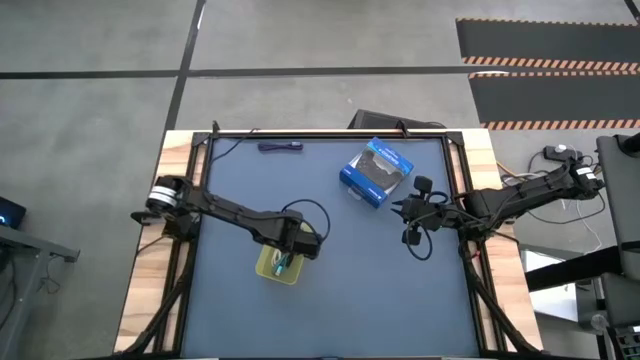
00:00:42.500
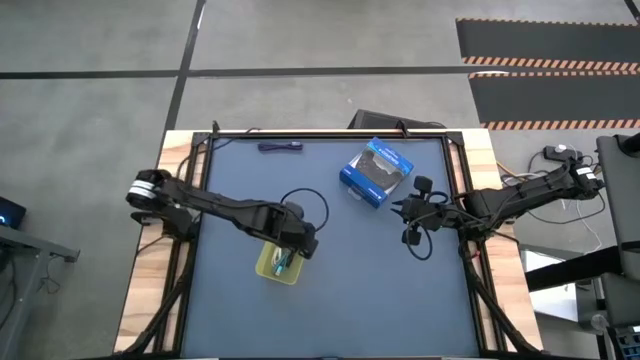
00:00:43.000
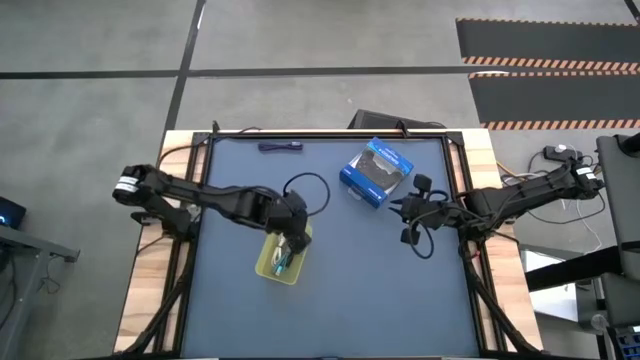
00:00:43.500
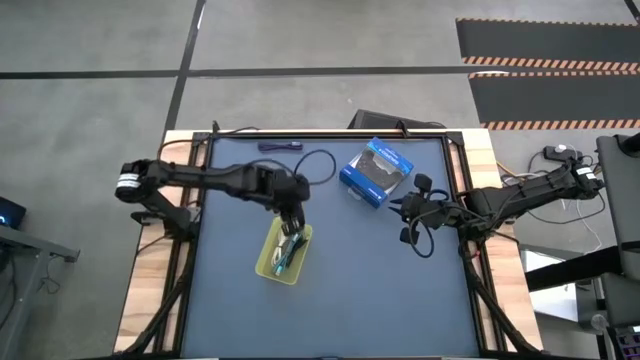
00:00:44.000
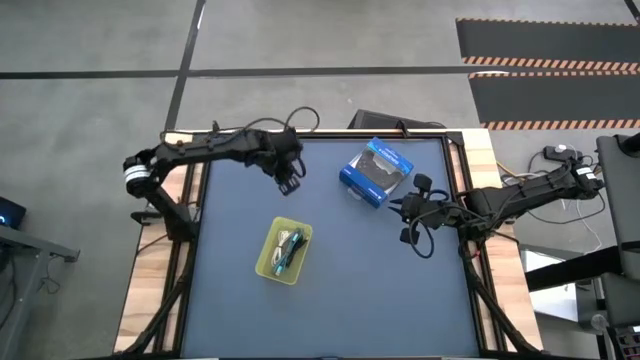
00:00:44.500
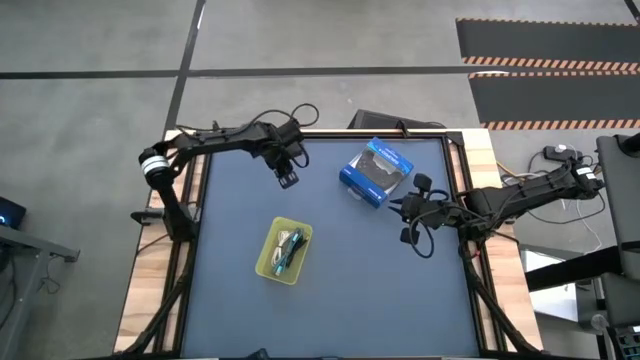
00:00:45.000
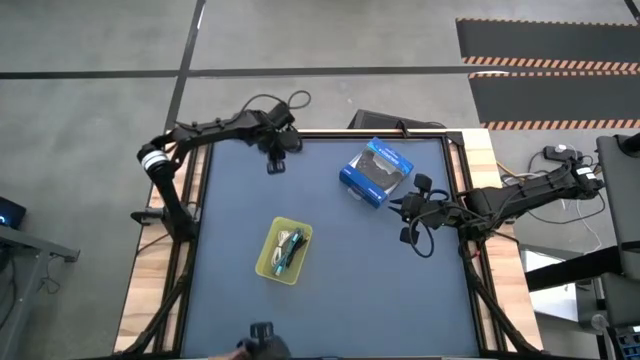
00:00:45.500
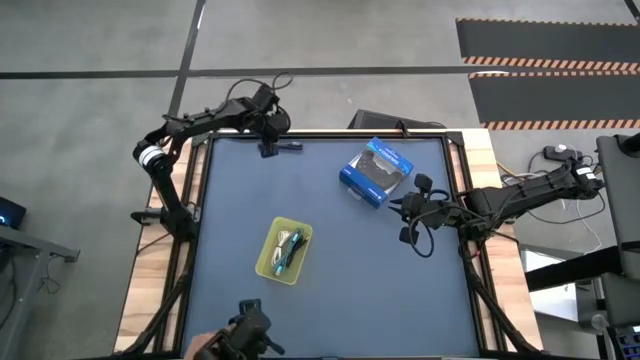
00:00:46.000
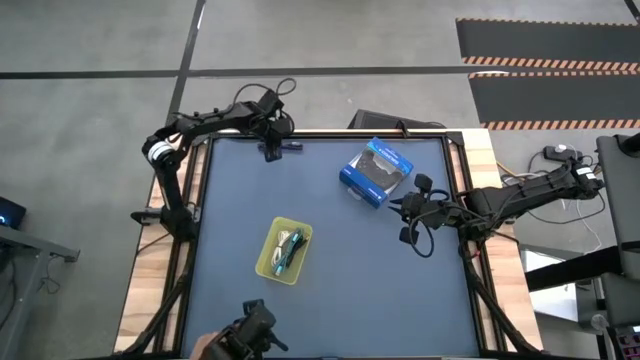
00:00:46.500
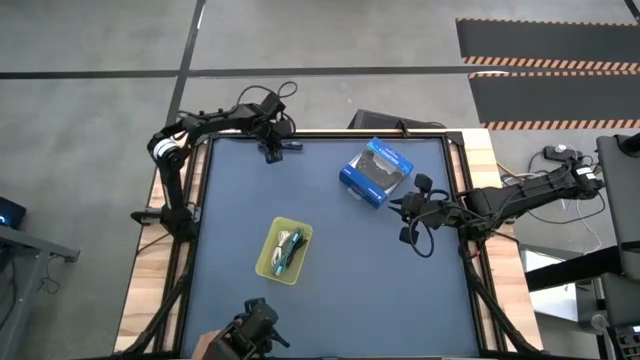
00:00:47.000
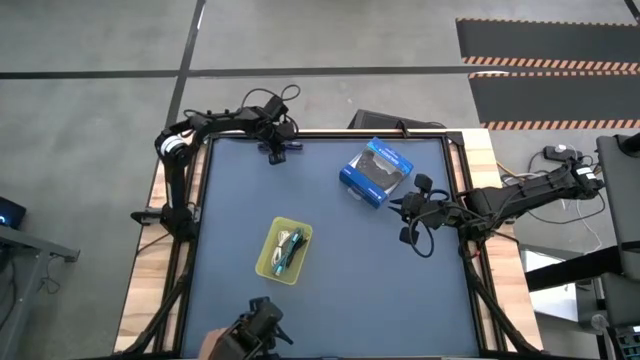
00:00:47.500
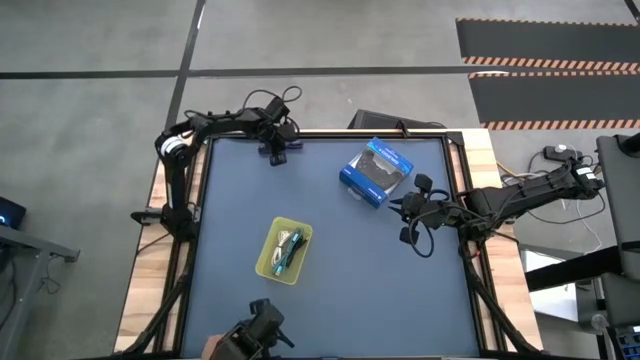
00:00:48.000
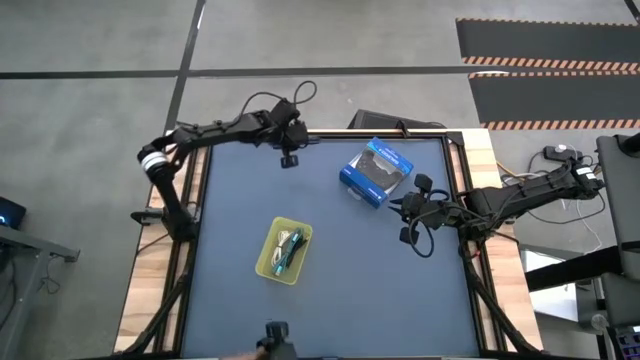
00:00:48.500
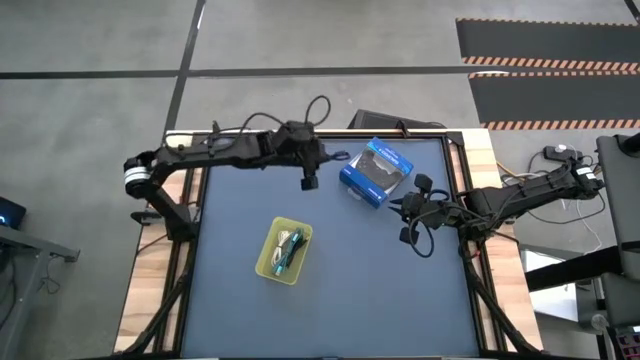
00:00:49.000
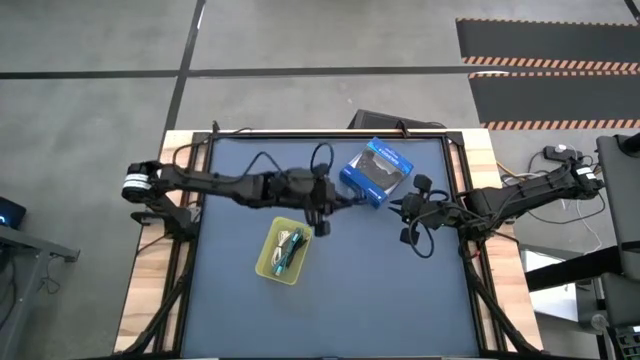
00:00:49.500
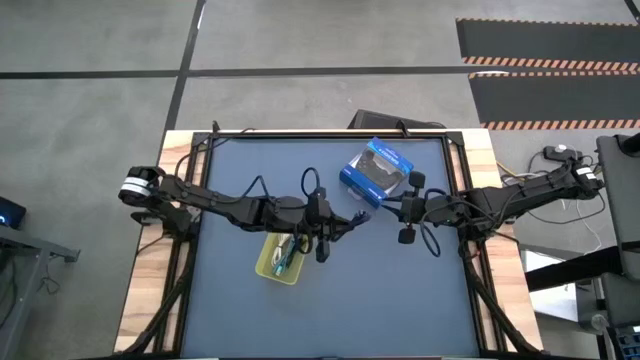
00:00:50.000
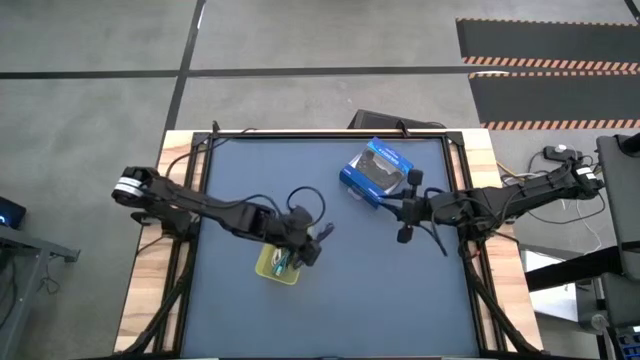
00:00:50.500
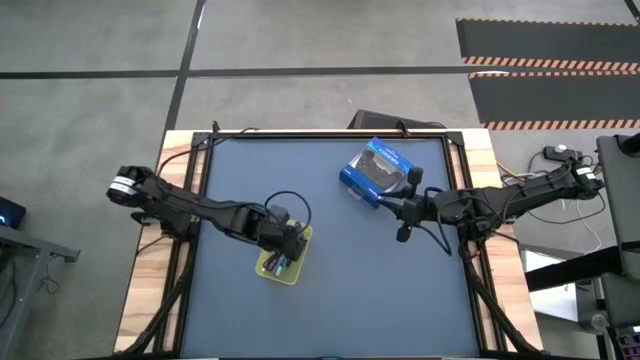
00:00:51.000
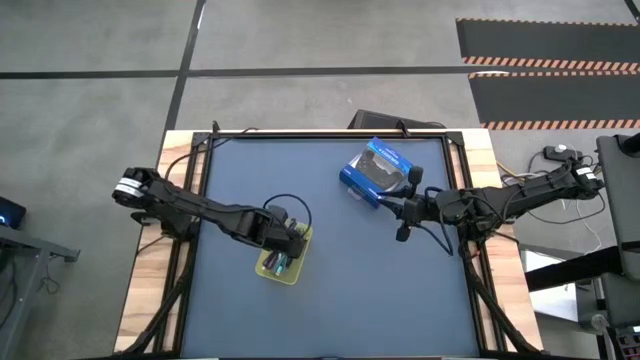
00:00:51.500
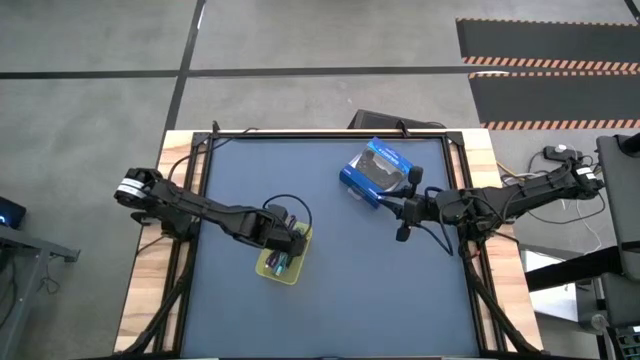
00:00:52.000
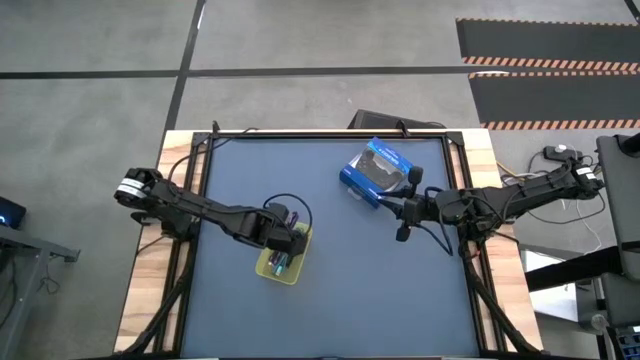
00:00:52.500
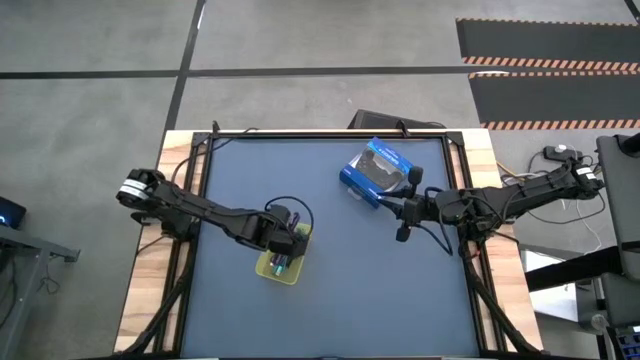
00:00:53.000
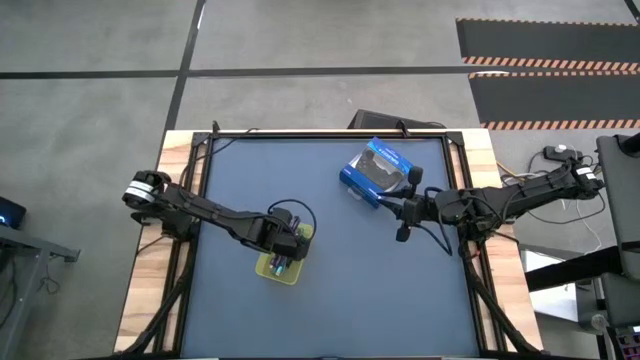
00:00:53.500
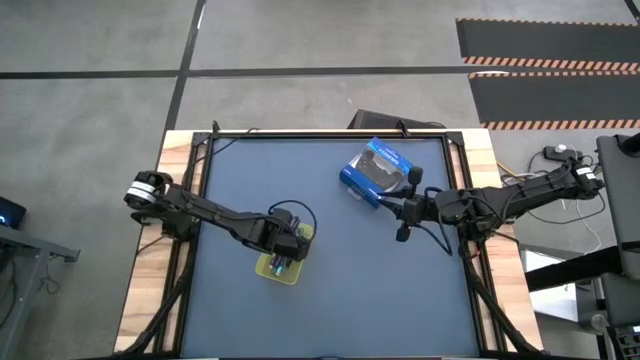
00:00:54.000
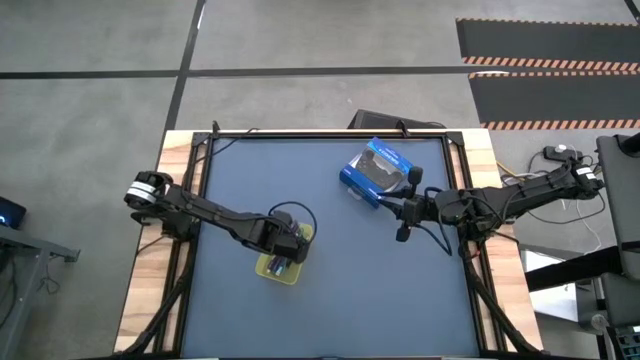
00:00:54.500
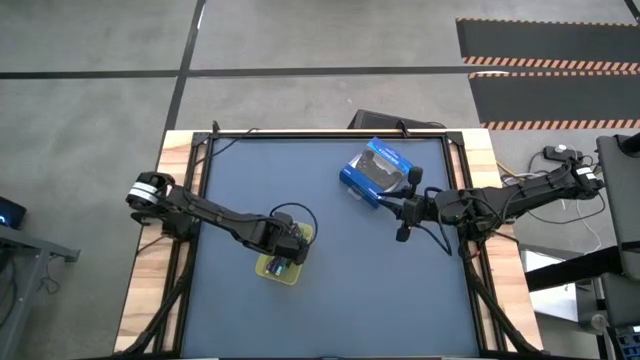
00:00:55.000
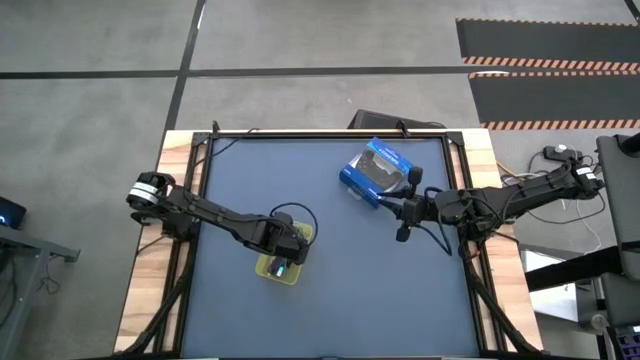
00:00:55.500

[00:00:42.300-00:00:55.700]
Task: Pick and place USB-C Cables
Put the violet charger cable into the yellow bin

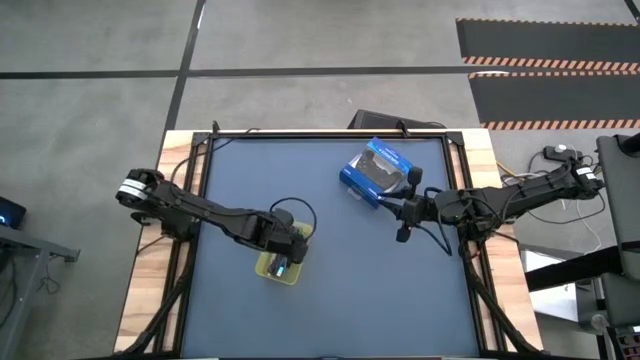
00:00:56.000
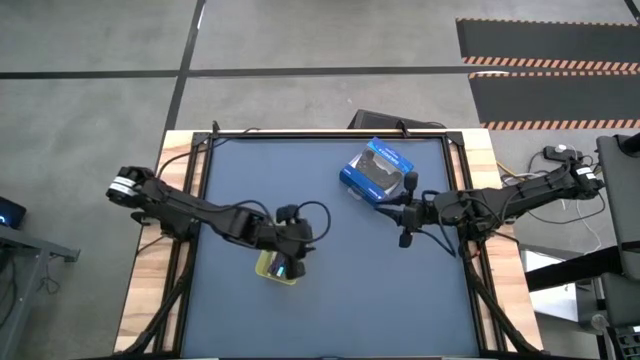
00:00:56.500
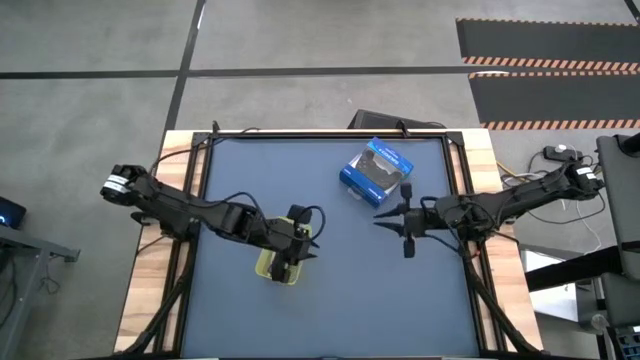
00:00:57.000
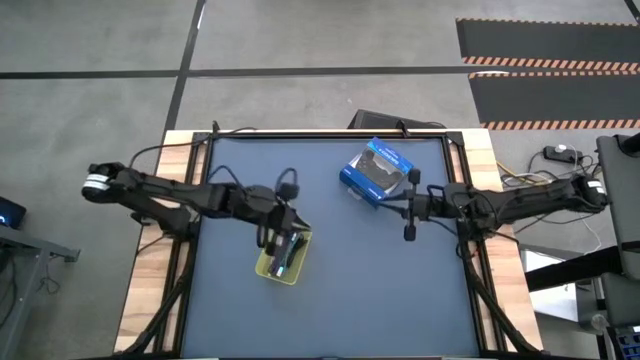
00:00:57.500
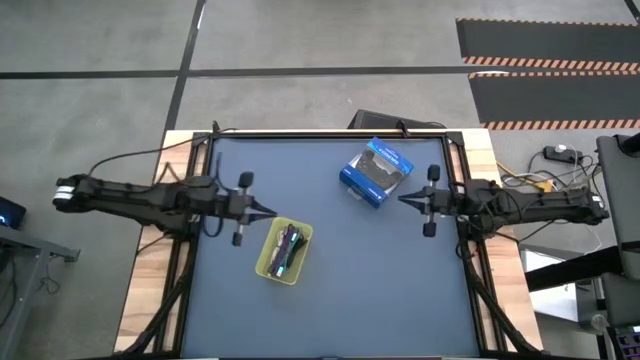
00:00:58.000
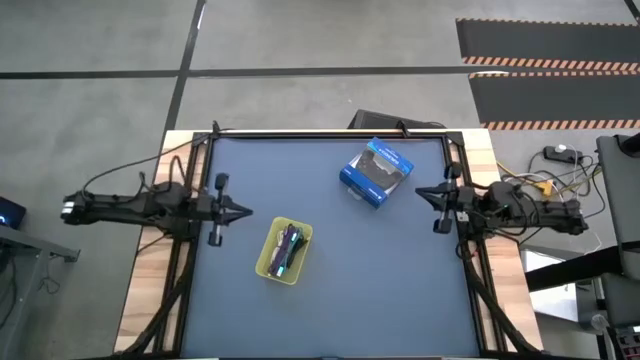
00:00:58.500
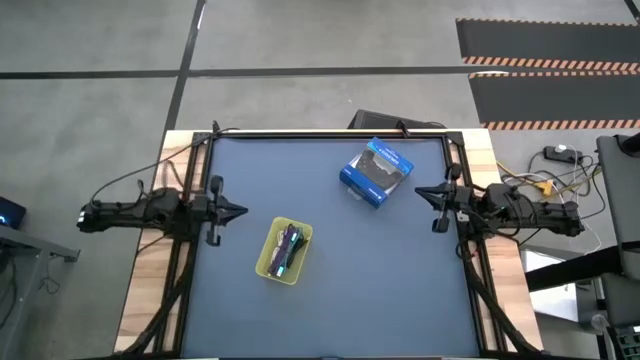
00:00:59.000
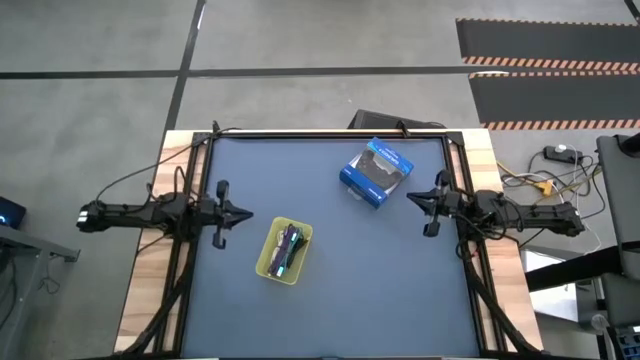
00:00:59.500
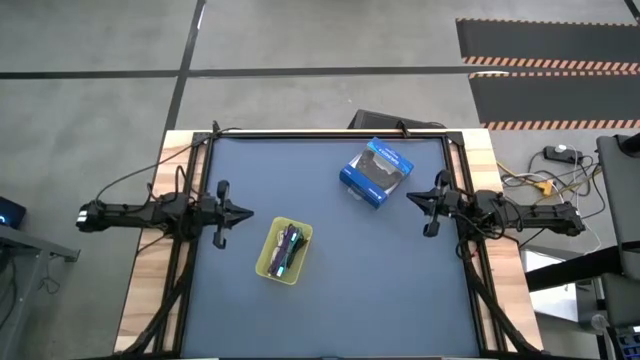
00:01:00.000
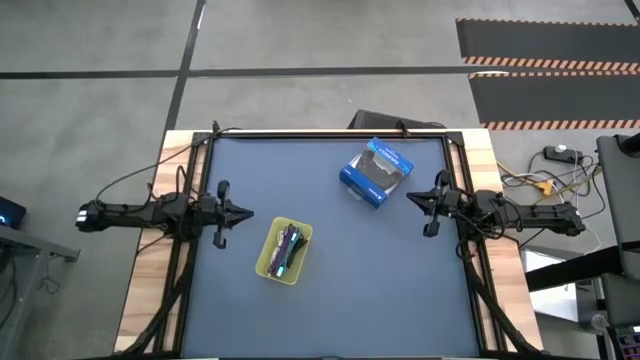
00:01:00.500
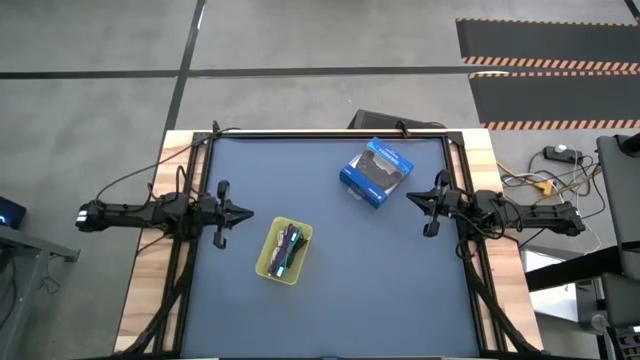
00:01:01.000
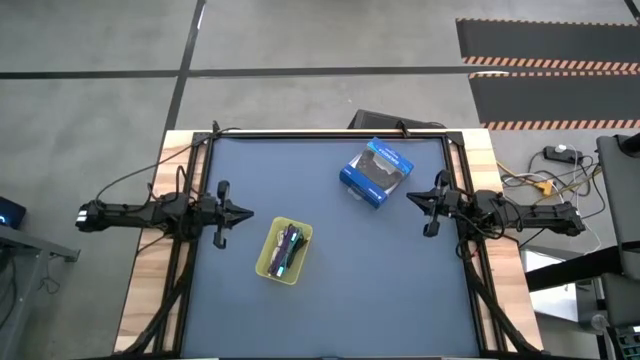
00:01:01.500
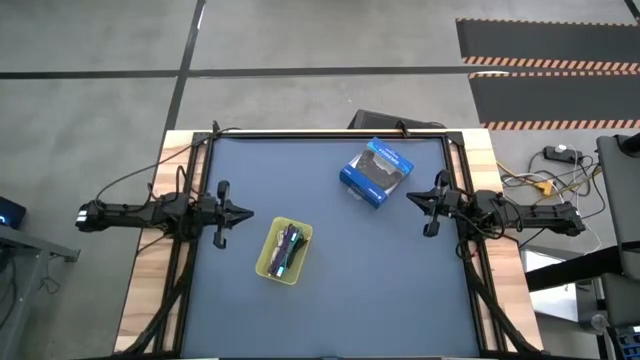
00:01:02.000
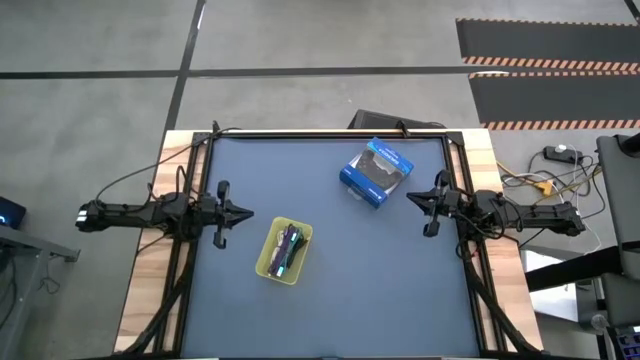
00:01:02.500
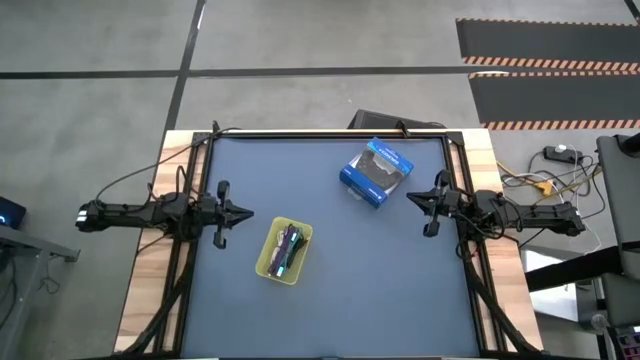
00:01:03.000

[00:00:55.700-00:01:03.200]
Return to Home Position
